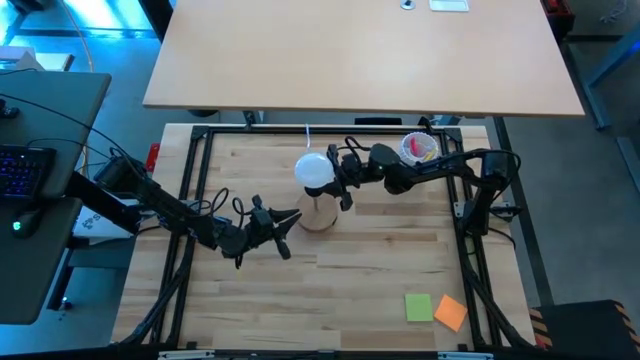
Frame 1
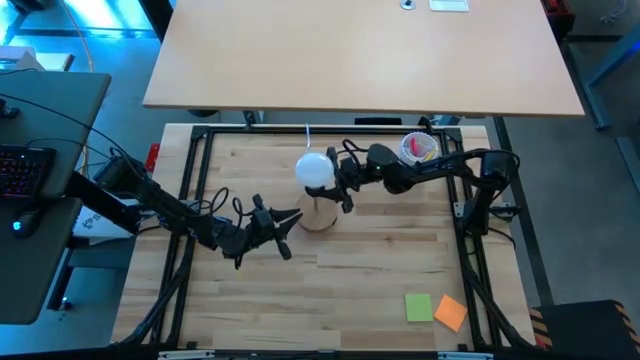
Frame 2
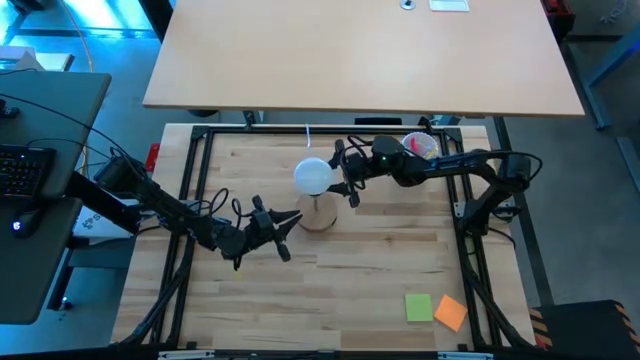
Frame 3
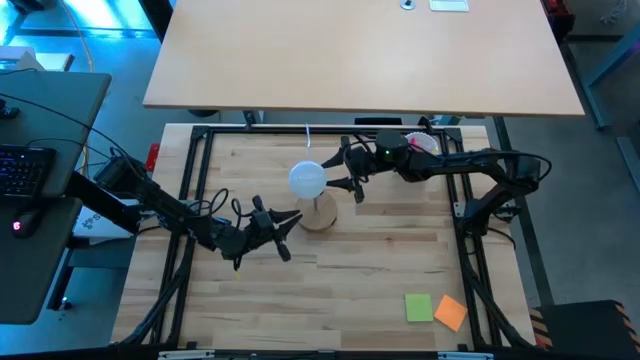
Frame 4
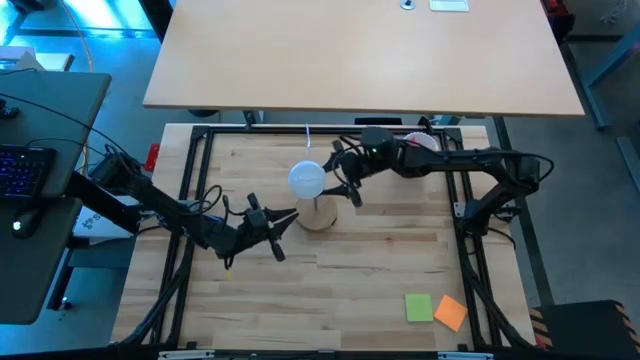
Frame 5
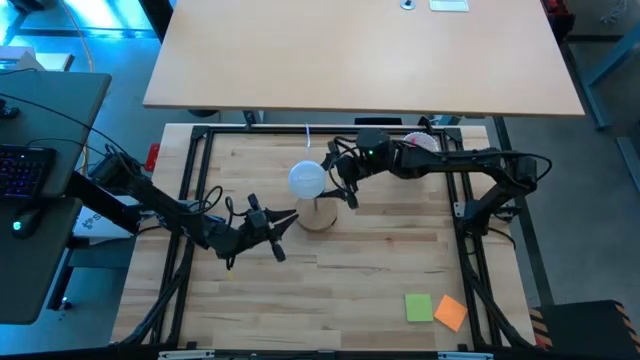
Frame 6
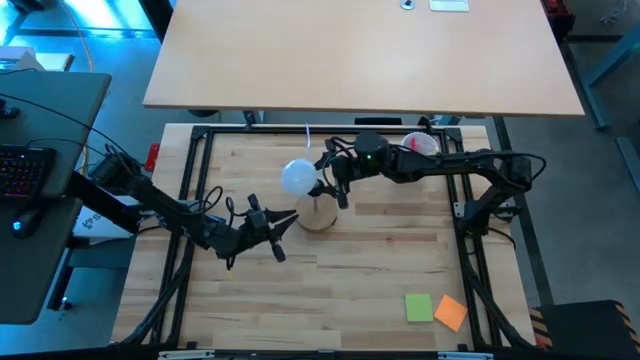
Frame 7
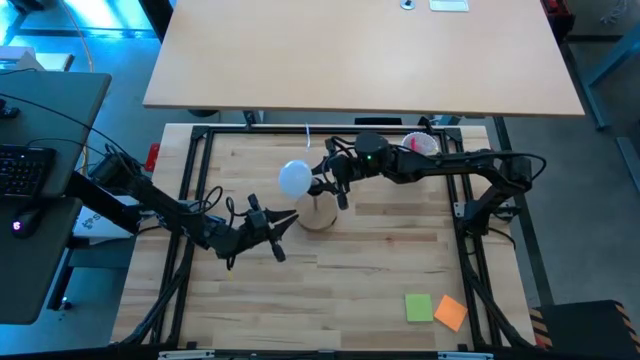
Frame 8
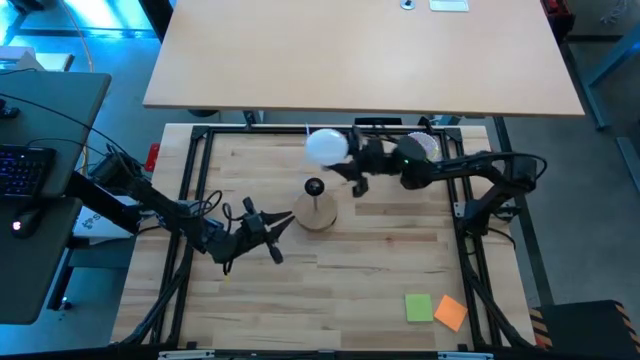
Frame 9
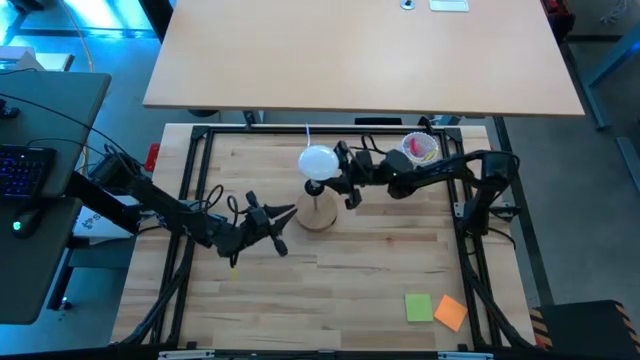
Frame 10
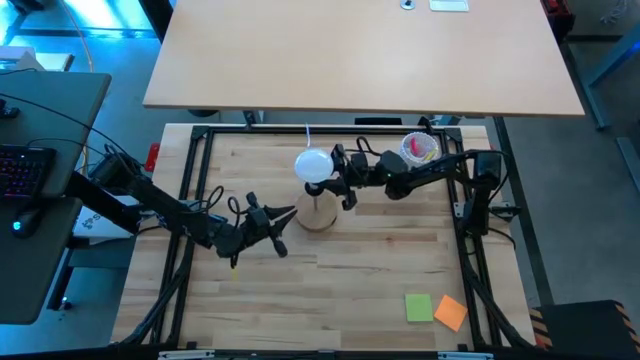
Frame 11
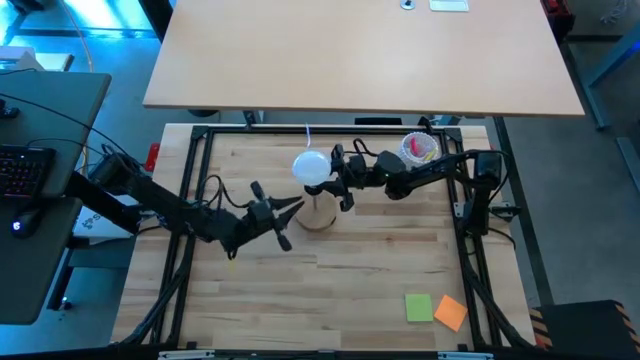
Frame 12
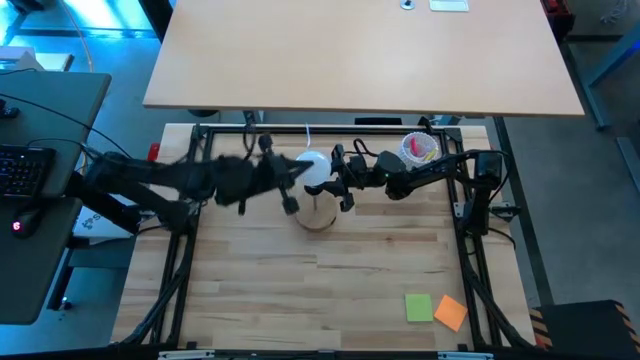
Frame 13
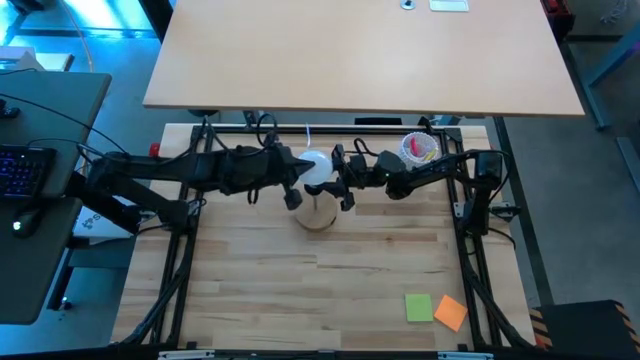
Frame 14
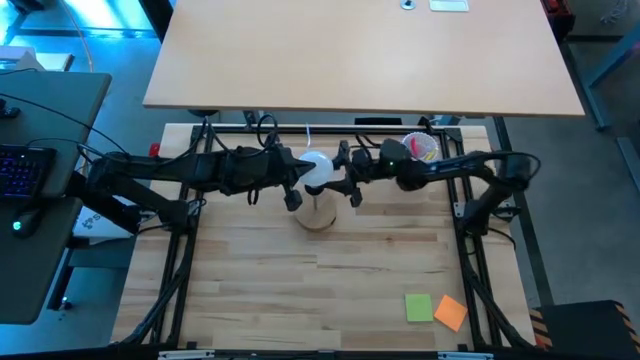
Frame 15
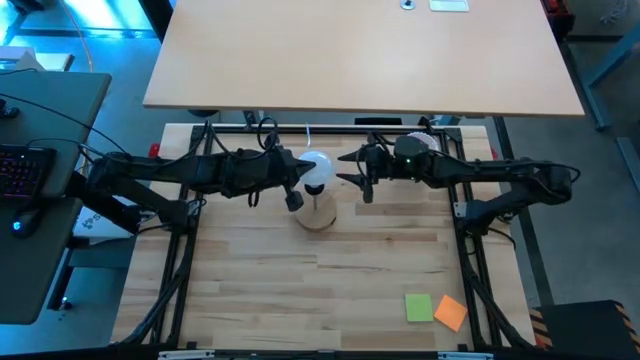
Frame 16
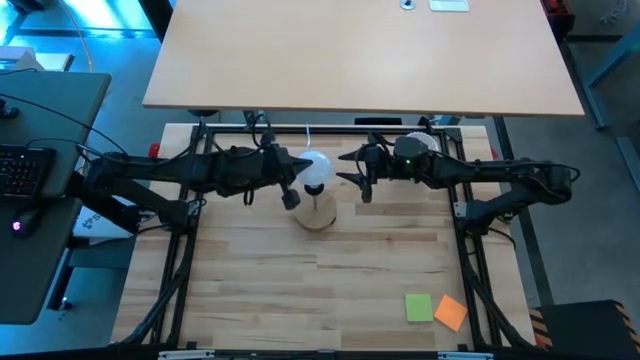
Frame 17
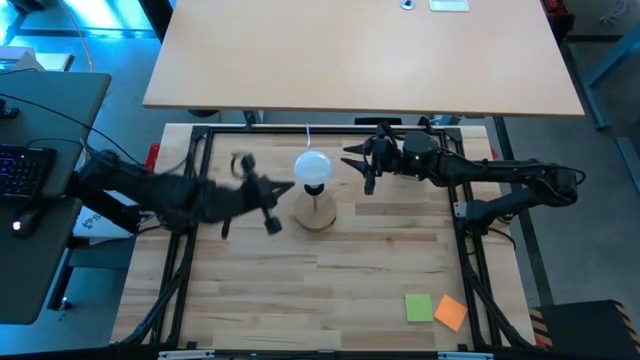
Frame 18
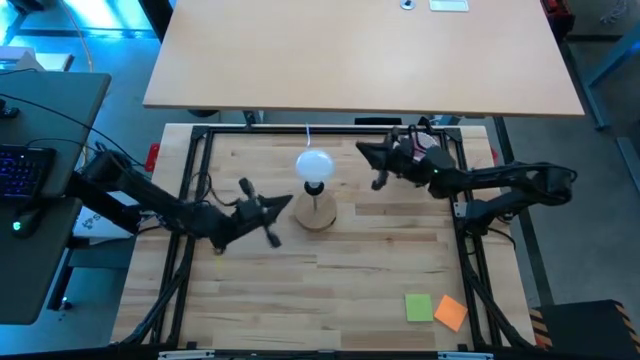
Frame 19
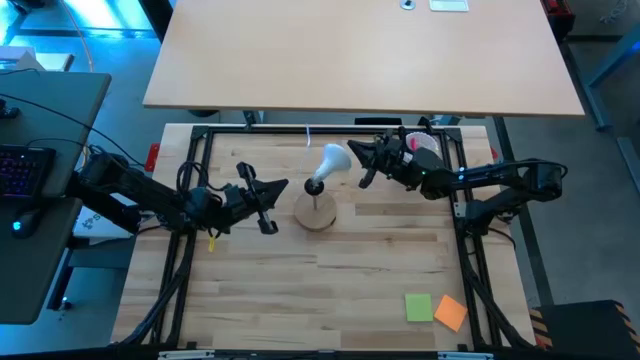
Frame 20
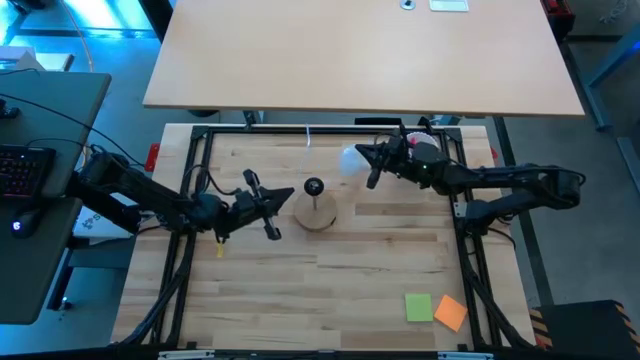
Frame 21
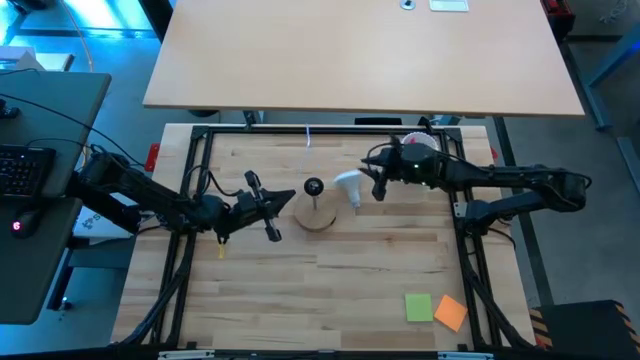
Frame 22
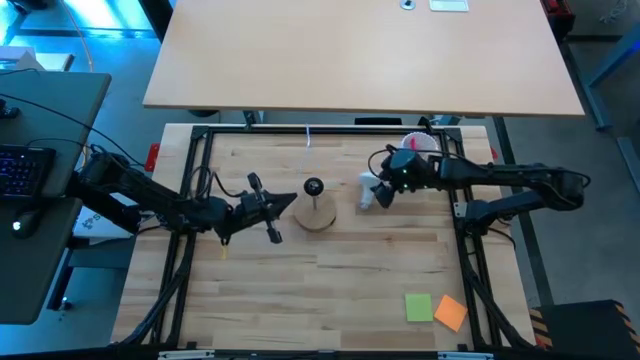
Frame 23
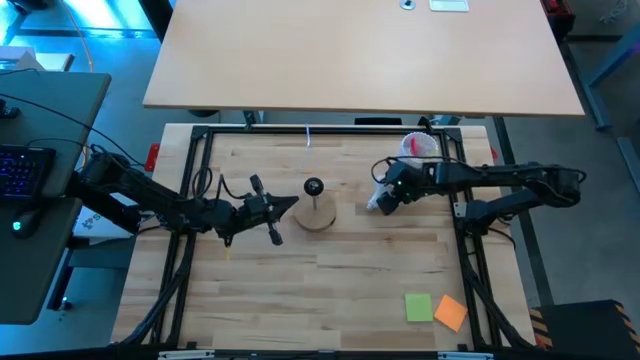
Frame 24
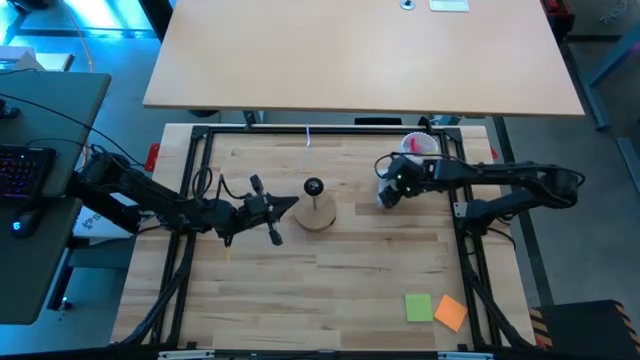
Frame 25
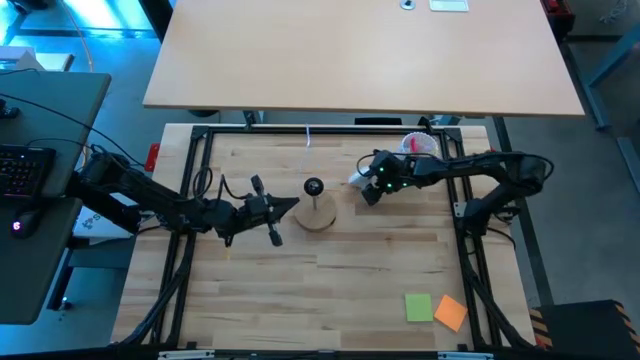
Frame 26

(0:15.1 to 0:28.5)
Task: Screw lightbulb
Insert the lightbulb into the brown lamp

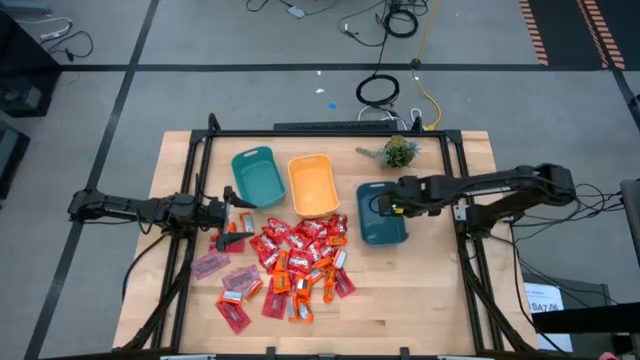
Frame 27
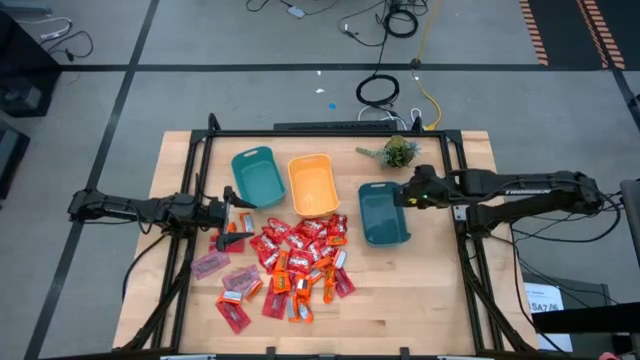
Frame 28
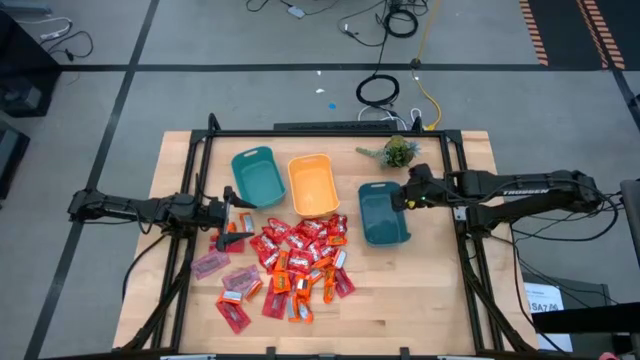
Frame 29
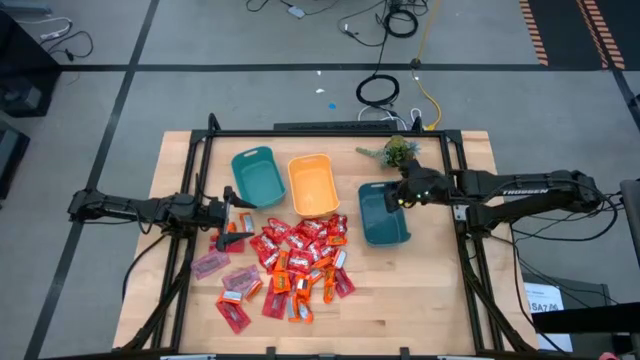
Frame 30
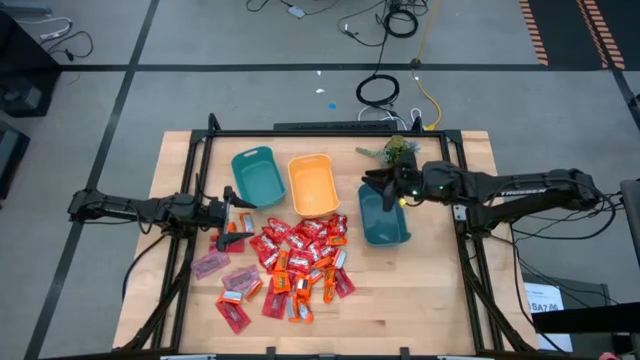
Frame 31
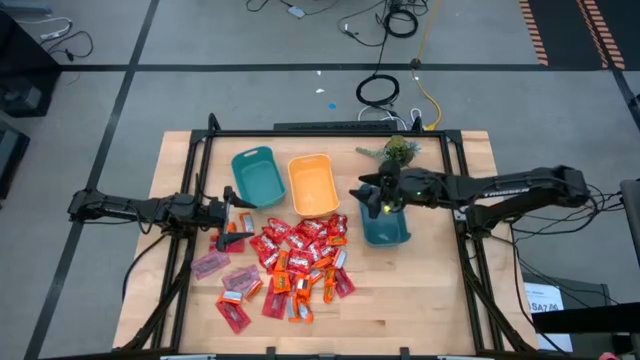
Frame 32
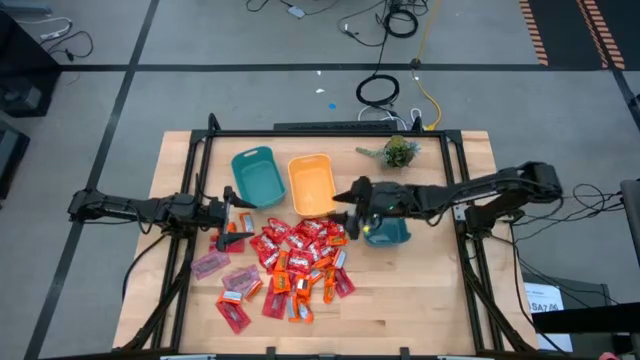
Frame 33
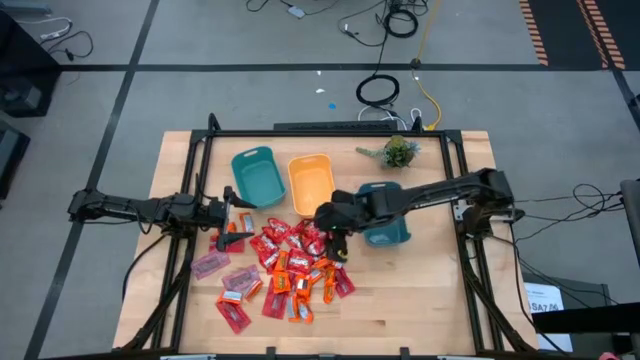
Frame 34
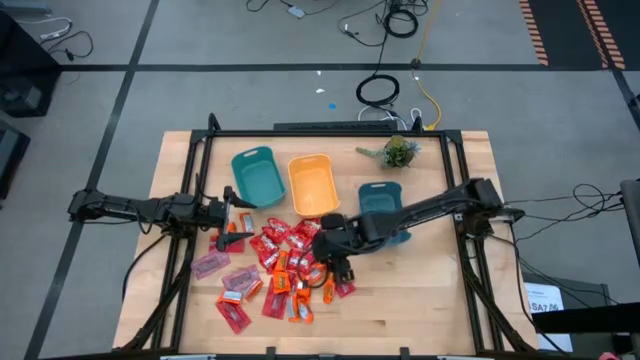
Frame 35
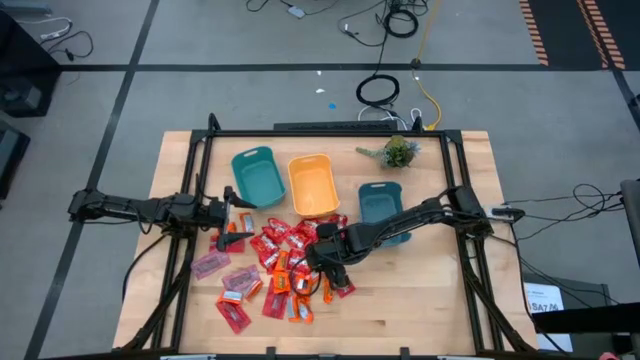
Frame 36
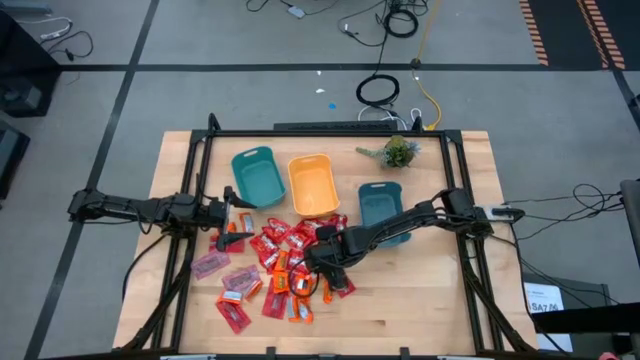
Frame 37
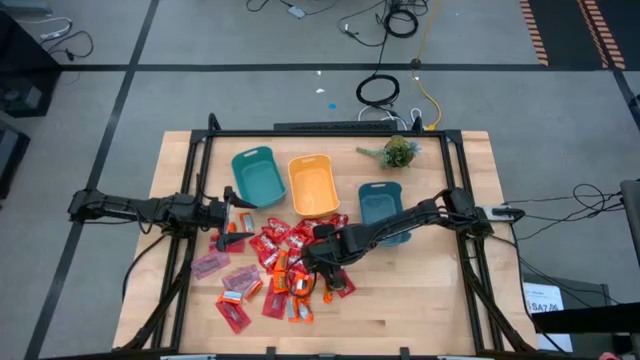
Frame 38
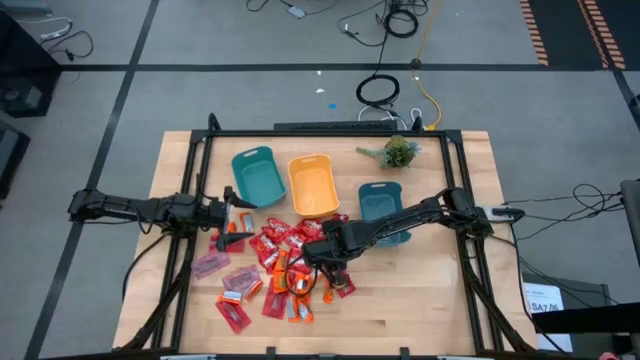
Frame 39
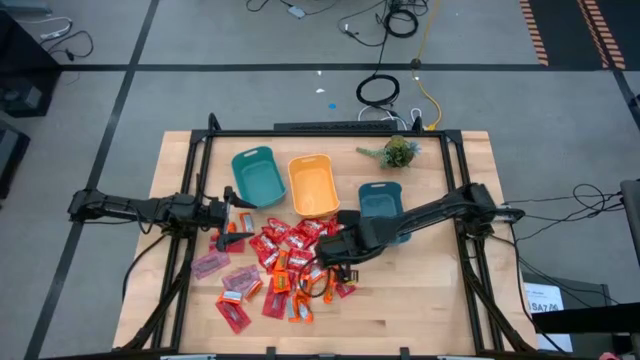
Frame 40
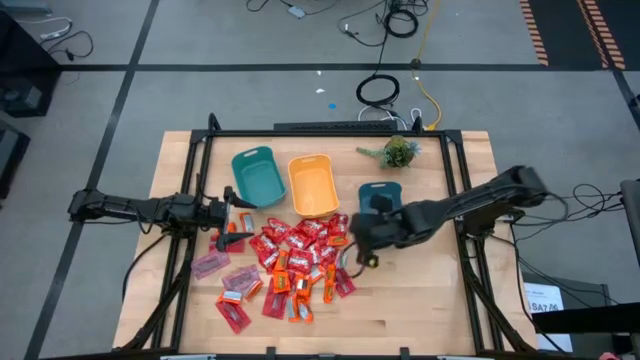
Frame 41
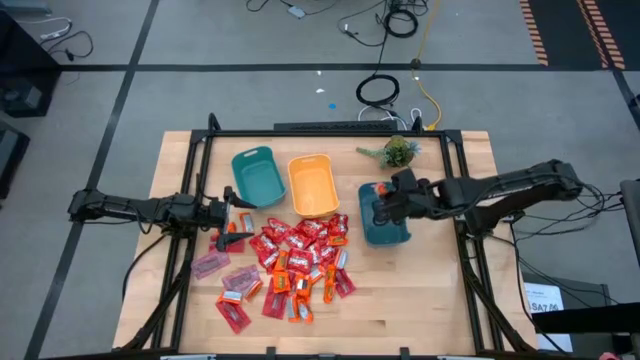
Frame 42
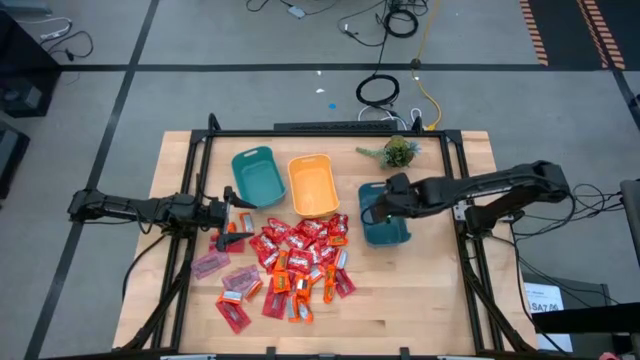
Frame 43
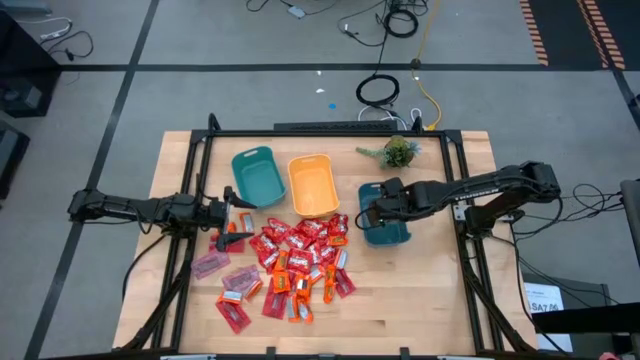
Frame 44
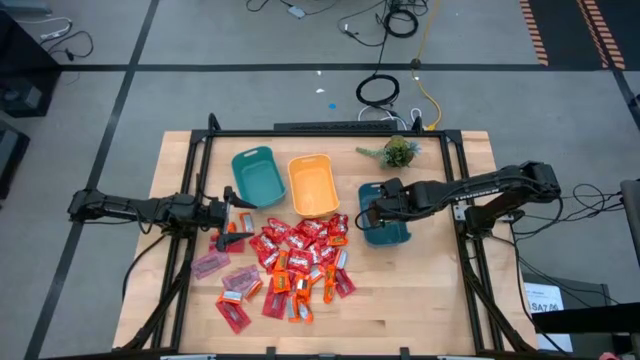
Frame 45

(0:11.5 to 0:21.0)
Task: Sort candy
Put the orange wrapper chocolate into the dark blue bin
